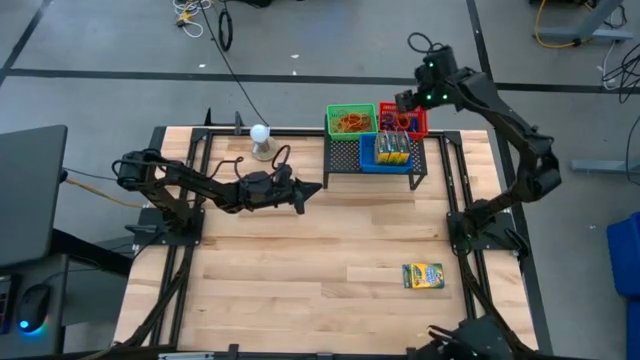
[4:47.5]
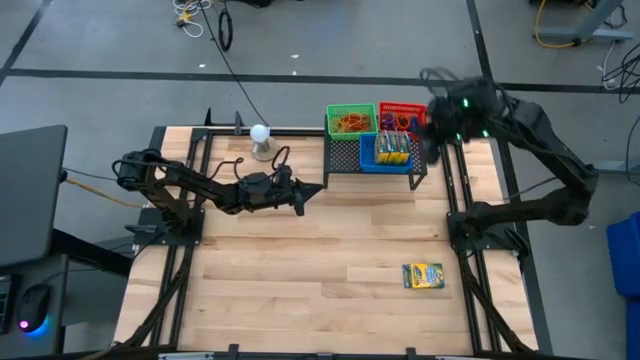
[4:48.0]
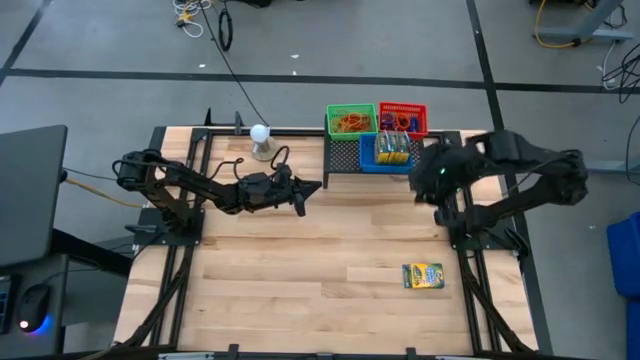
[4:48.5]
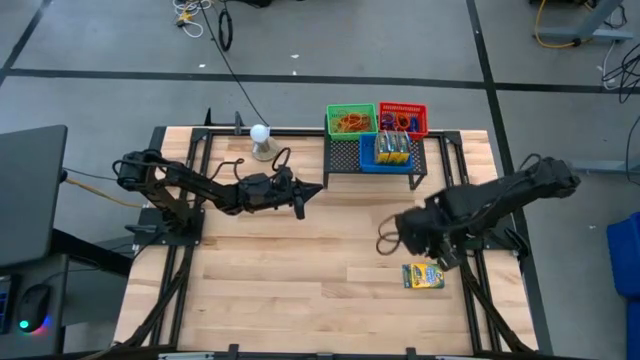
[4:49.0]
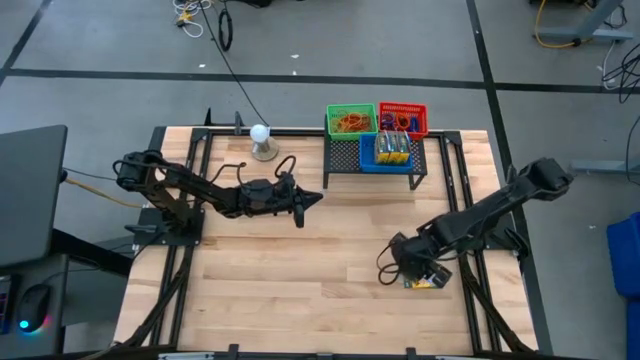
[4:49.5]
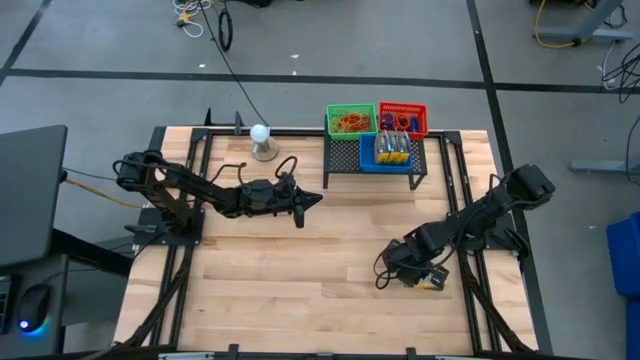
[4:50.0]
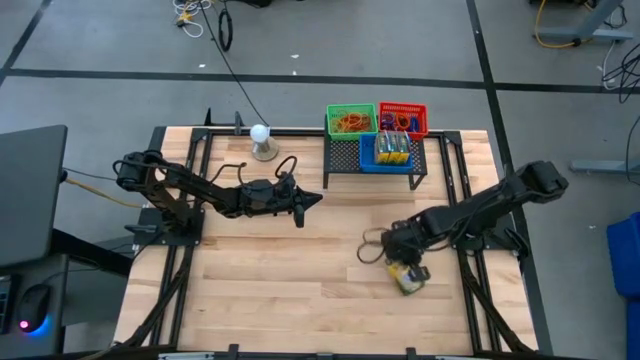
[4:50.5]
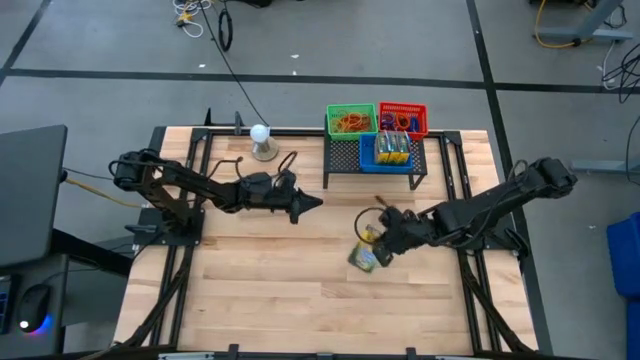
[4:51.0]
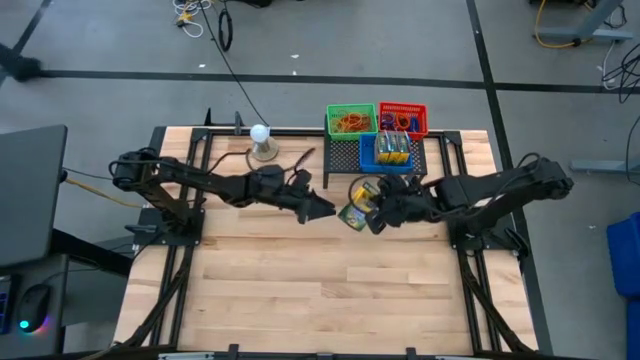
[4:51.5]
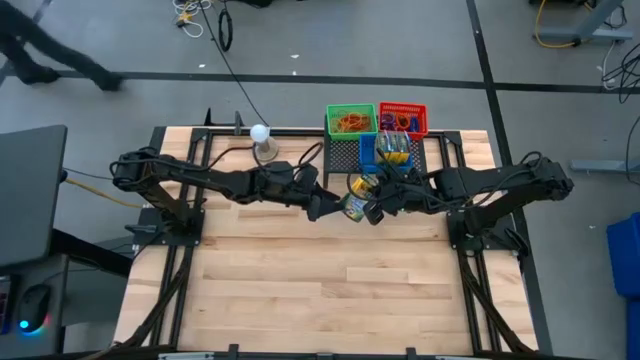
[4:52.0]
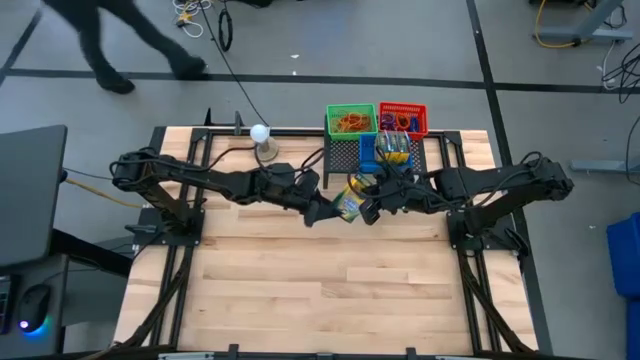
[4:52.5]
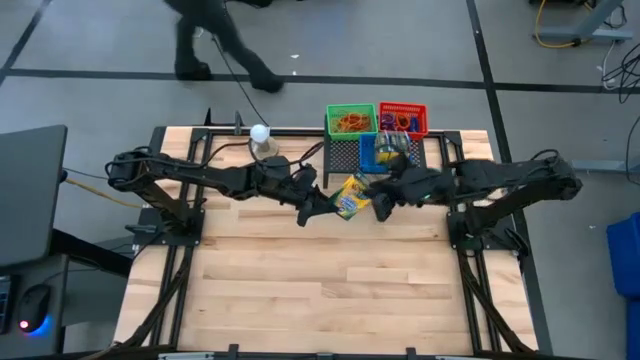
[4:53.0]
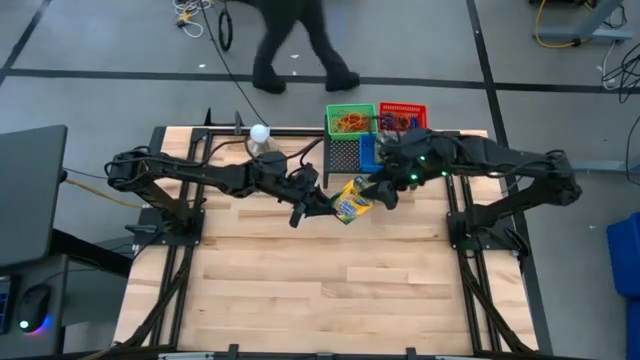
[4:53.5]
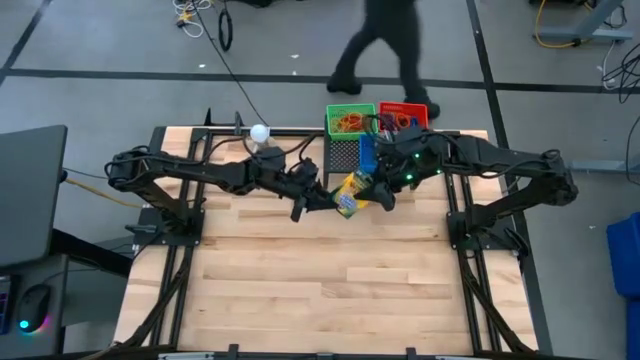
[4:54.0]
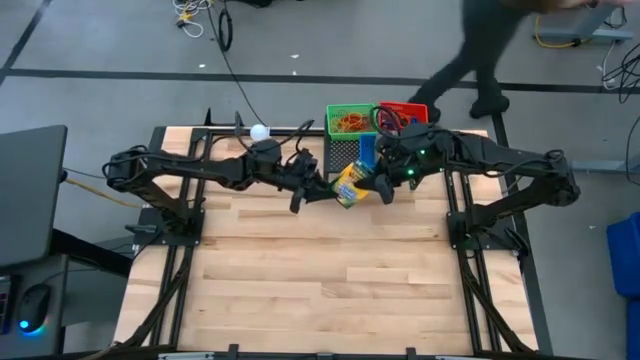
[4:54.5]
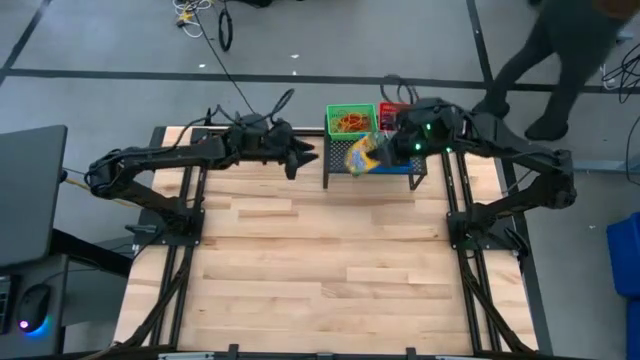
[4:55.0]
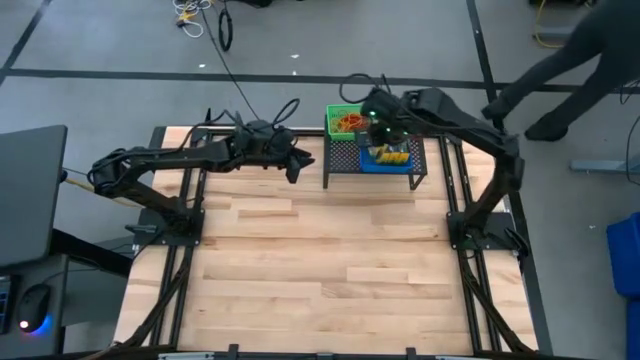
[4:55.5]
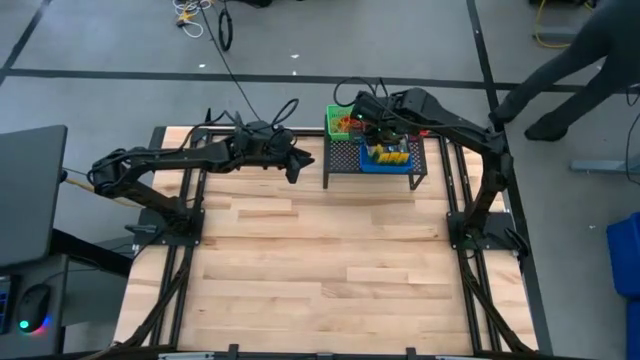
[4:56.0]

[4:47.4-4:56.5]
Task: Pick & Place Office Desk Supplies
Put the yellow crayon box into the blue bin

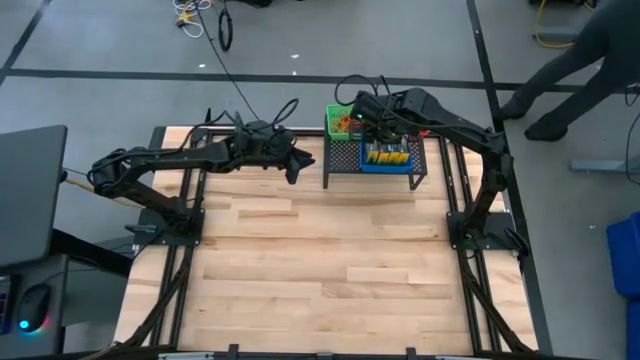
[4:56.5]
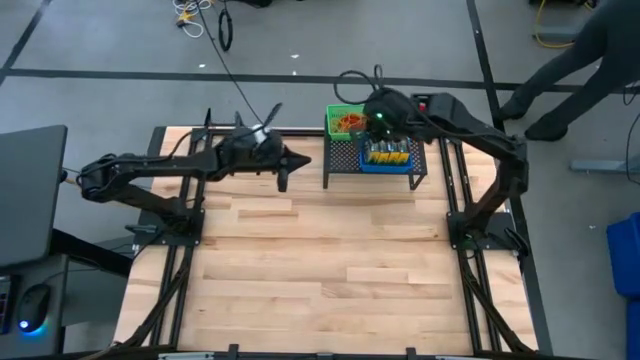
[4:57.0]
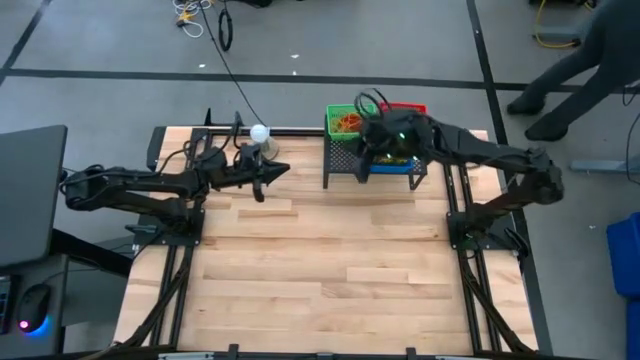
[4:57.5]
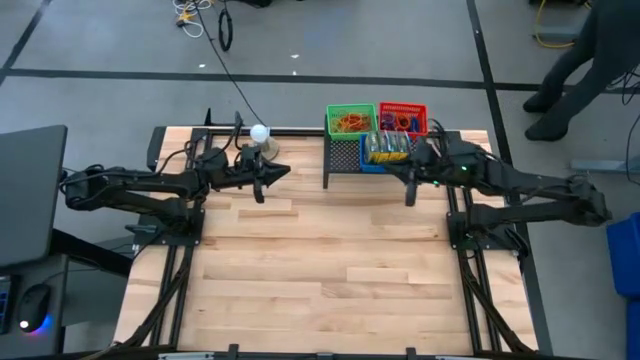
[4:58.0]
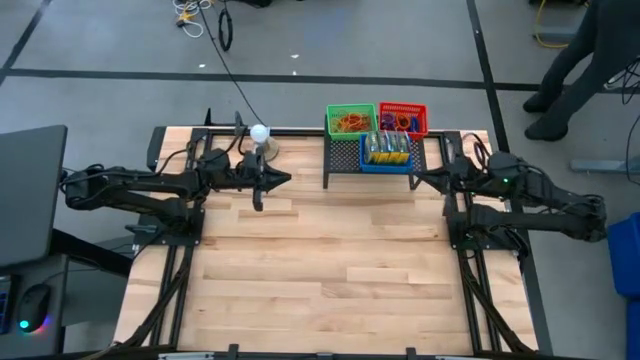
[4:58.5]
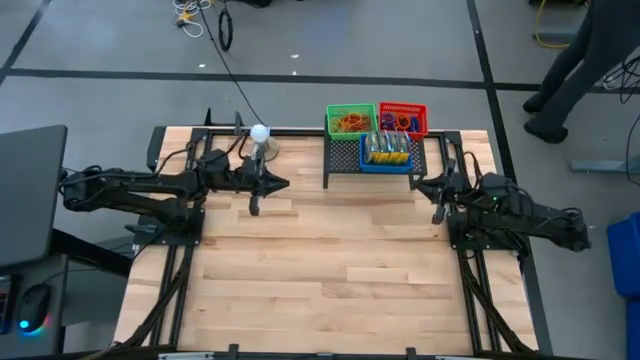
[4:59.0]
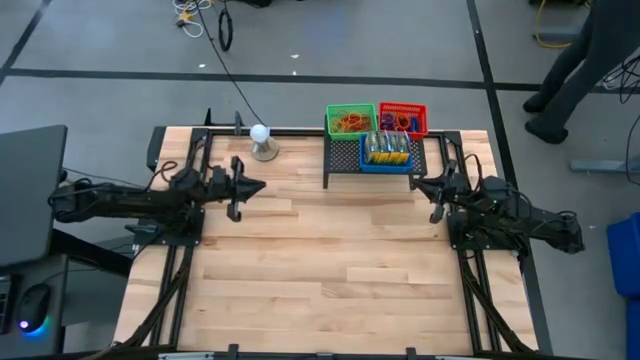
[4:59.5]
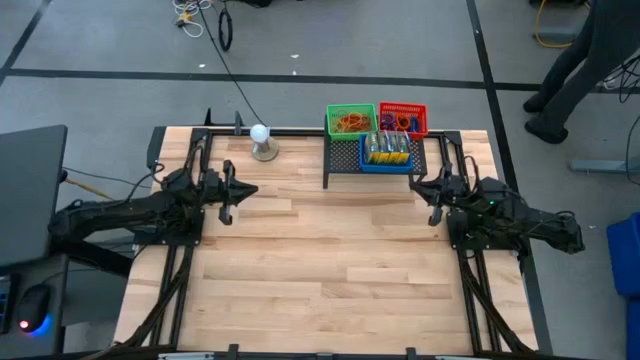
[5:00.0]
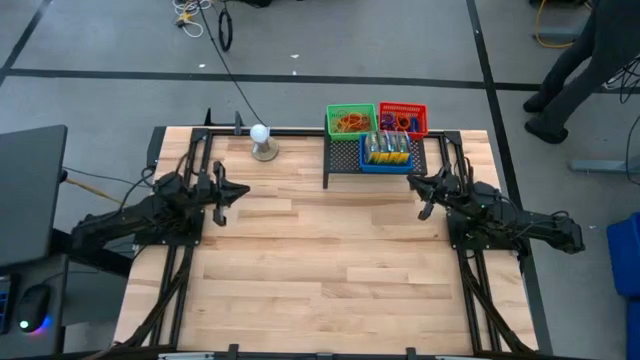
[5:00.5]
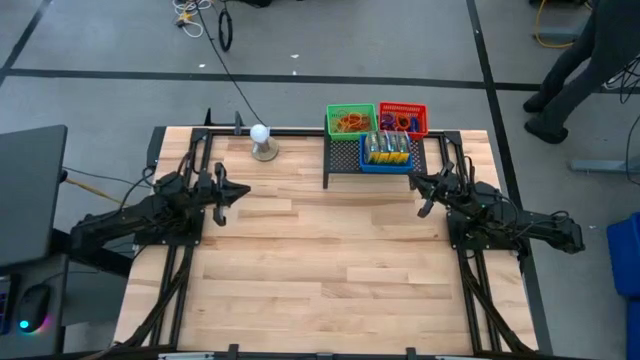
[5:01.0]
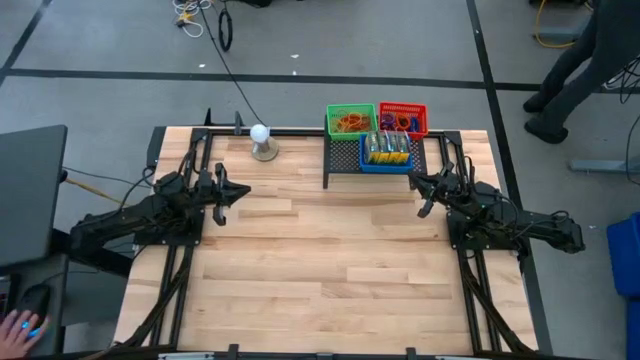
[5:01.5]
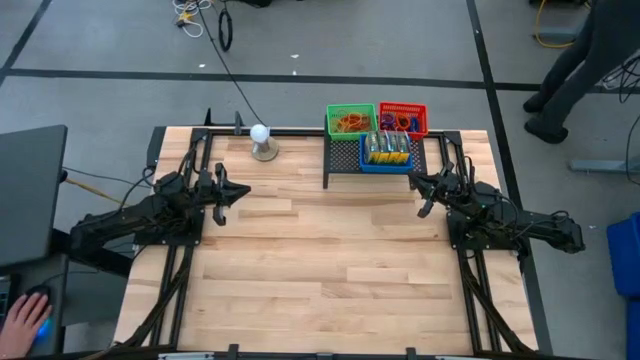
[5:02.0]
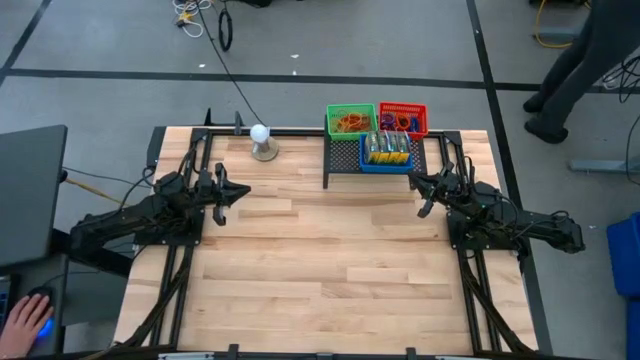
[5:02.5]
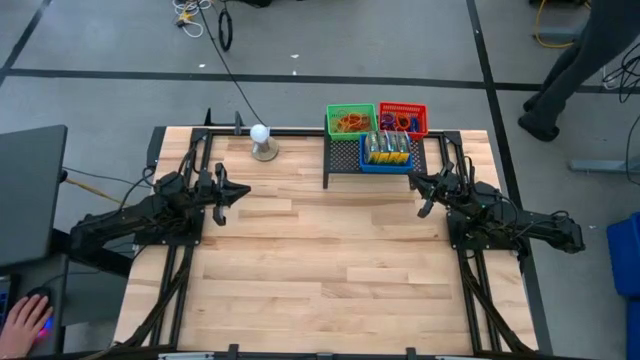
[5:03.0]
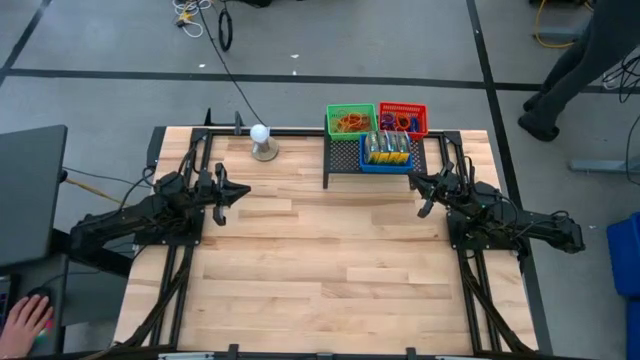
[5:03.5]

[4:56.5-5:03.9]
Return to Home Position

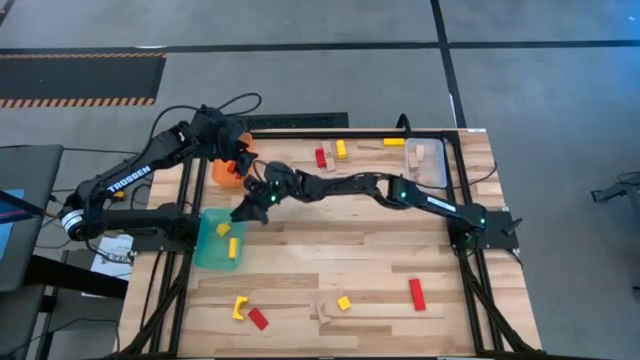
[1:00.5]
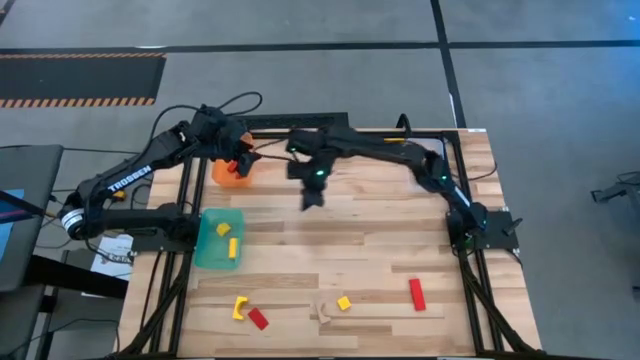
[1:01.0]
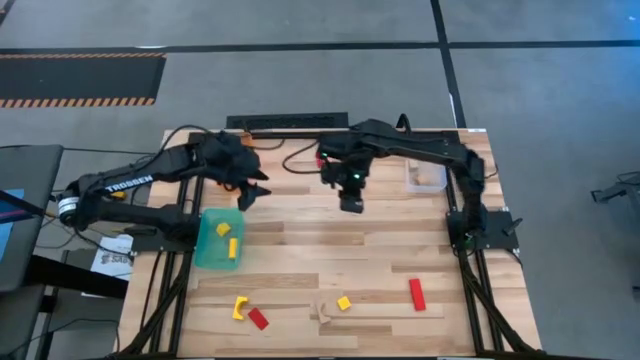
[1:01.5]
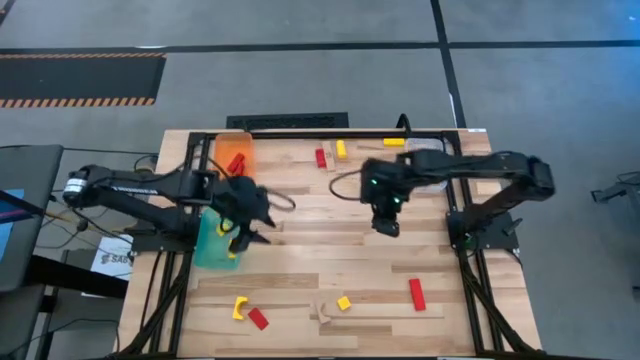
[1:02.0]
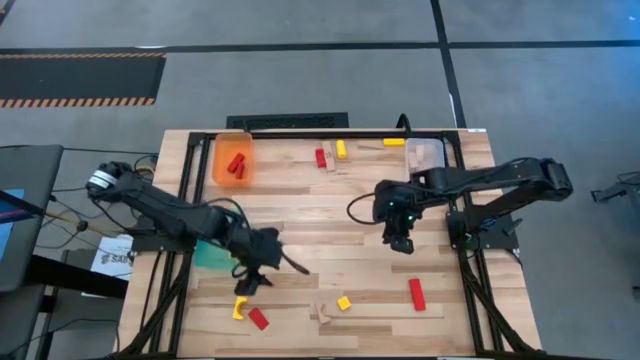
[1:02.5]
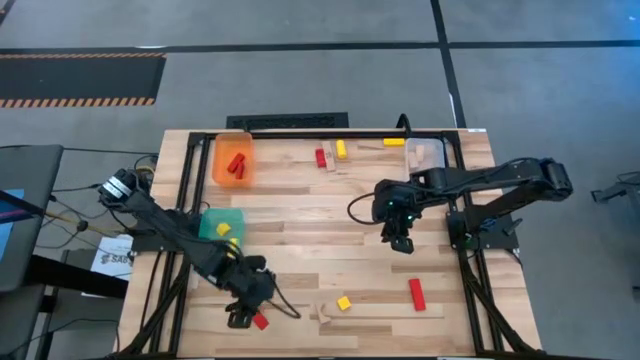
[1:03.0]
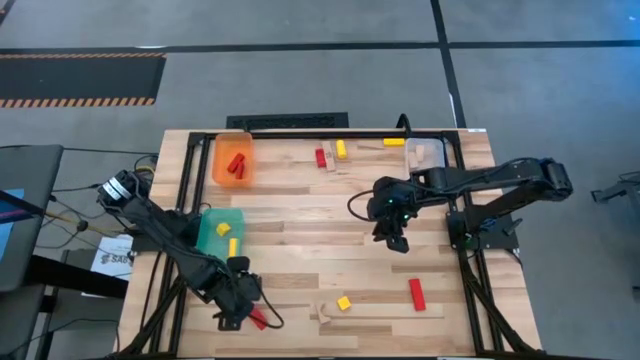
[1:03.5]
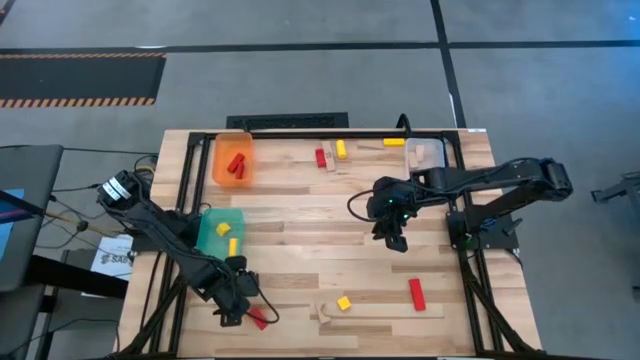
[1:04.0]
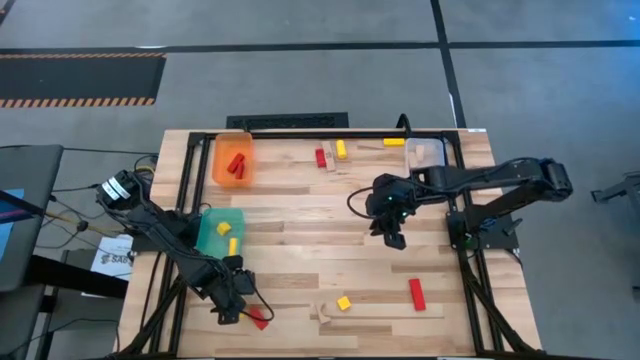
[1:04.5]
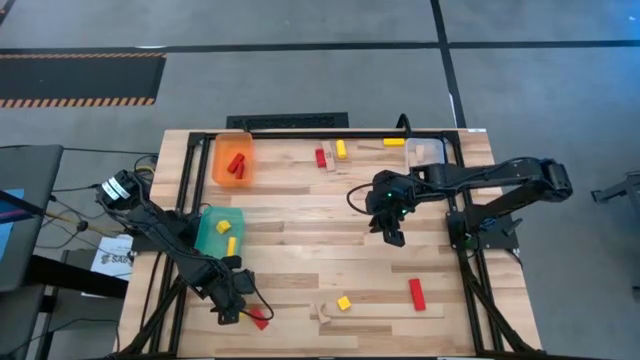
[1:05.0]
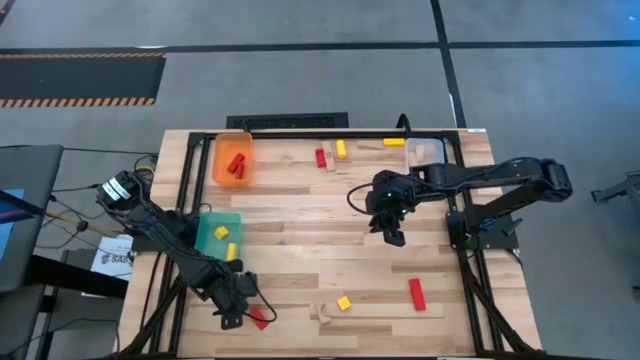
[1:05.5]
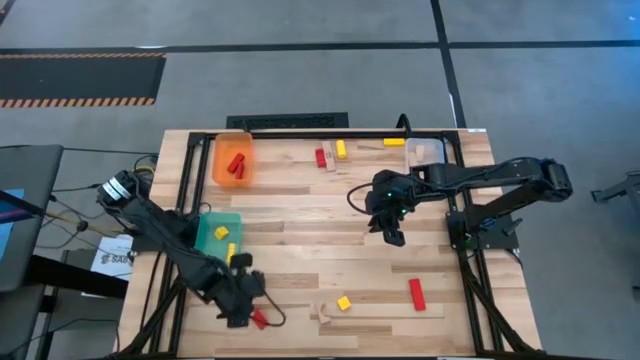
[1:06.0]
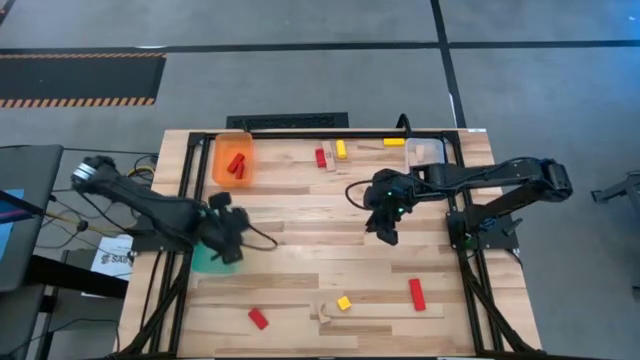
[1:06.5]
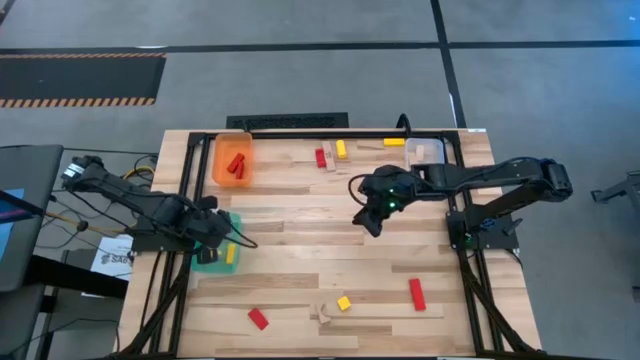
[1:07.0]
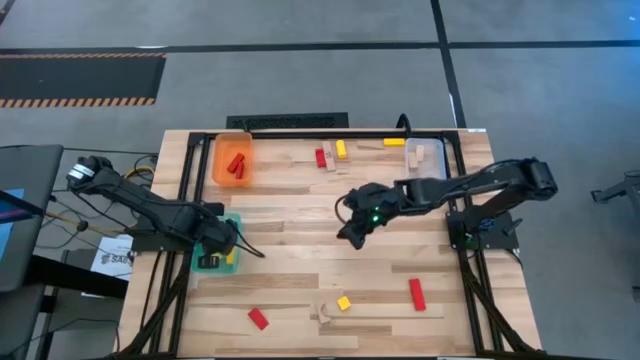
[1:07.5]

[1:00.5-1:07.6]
Task: Sort & place blocks by color
Put the yellow wooden block into the green bin
